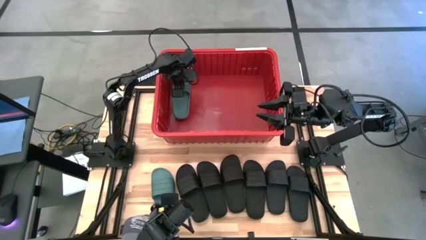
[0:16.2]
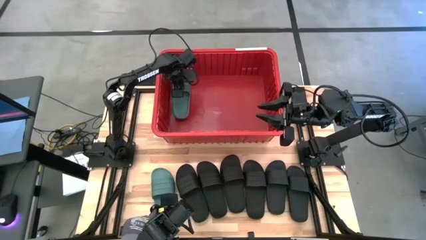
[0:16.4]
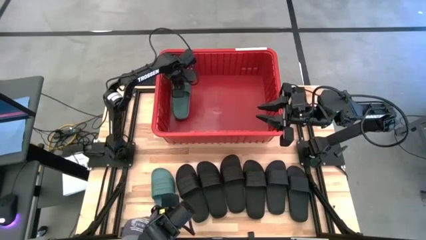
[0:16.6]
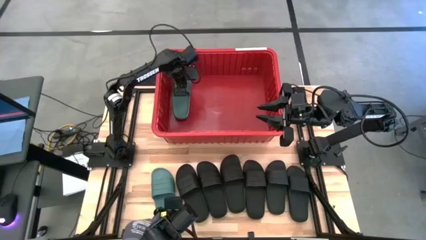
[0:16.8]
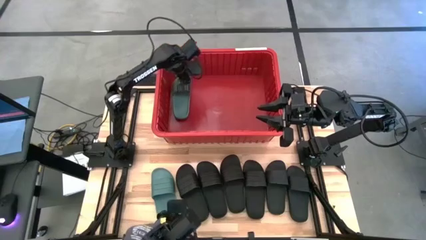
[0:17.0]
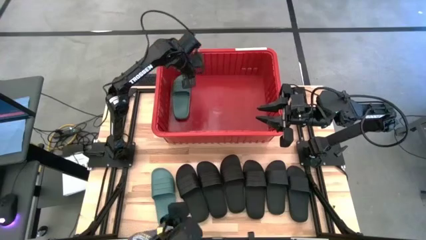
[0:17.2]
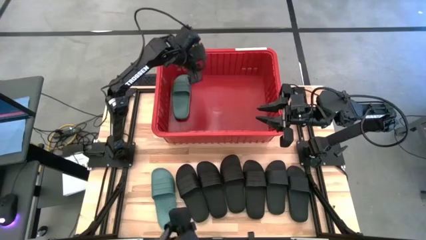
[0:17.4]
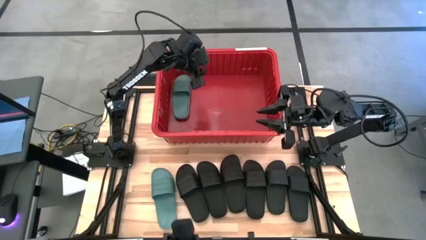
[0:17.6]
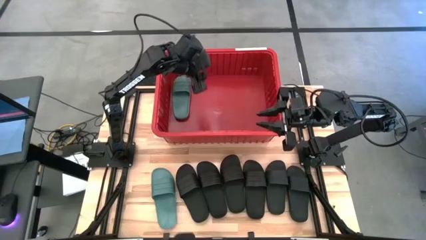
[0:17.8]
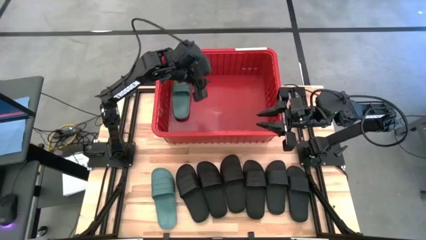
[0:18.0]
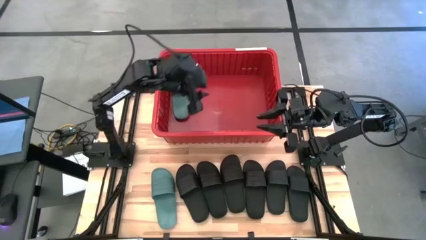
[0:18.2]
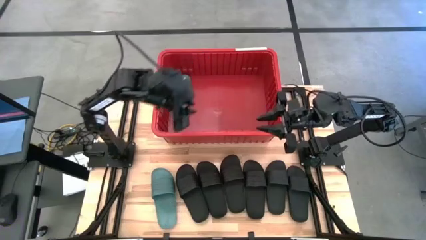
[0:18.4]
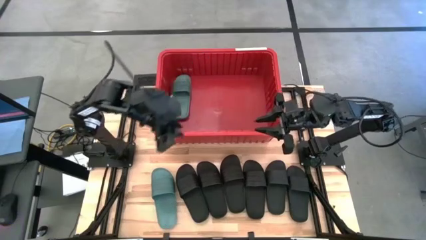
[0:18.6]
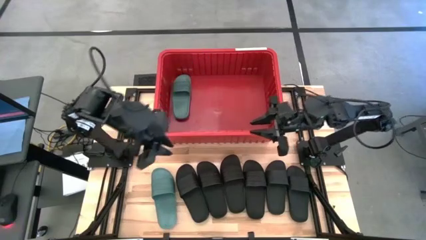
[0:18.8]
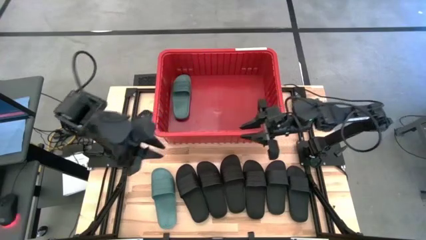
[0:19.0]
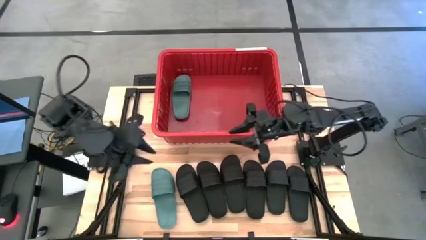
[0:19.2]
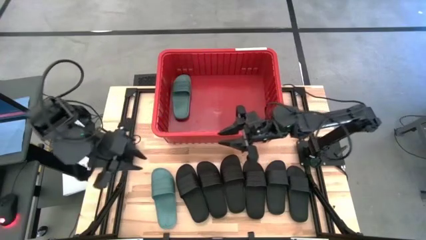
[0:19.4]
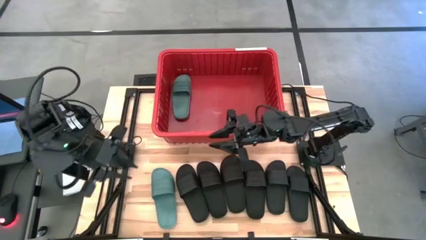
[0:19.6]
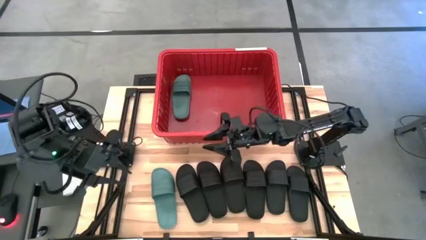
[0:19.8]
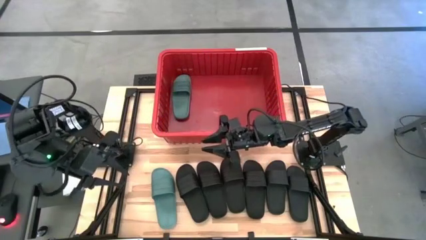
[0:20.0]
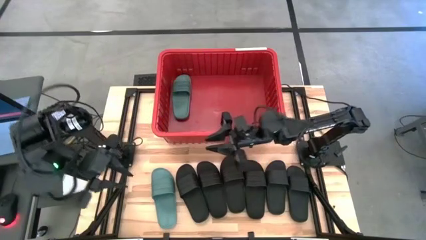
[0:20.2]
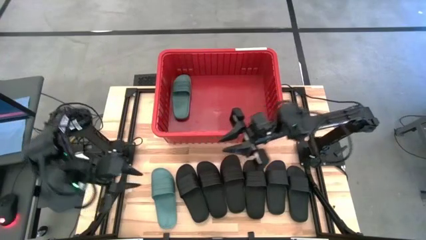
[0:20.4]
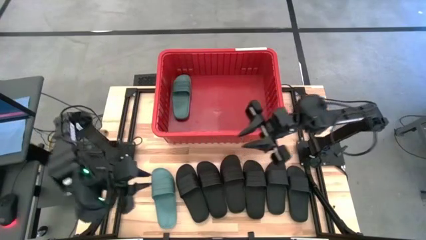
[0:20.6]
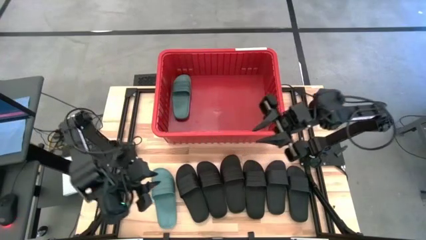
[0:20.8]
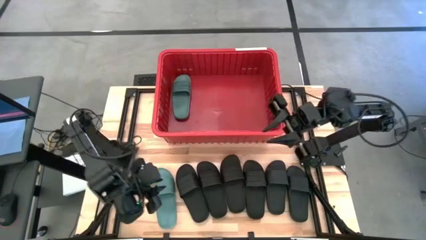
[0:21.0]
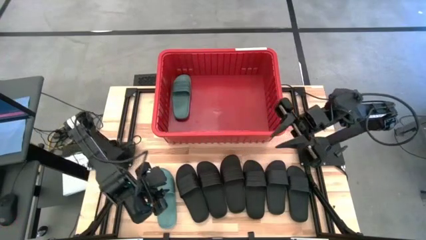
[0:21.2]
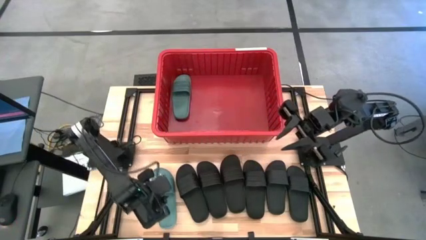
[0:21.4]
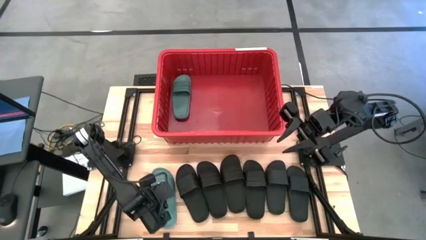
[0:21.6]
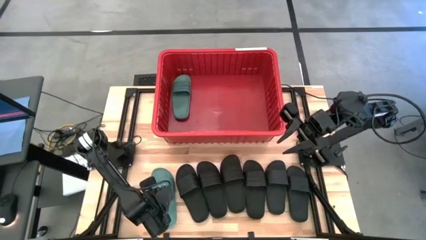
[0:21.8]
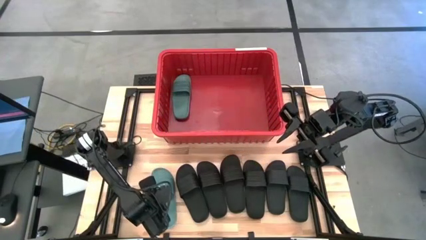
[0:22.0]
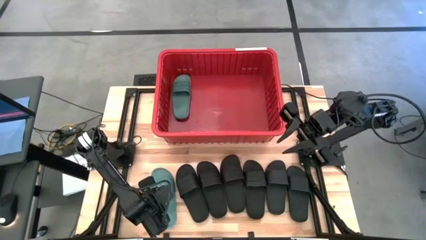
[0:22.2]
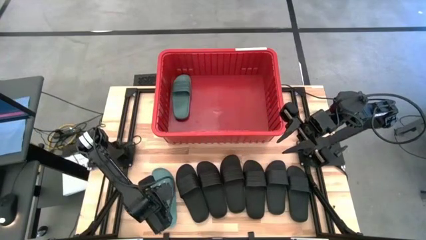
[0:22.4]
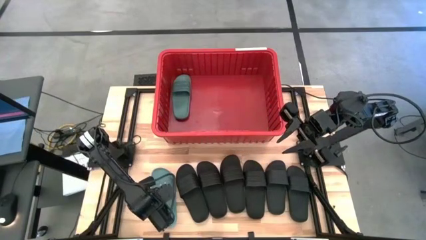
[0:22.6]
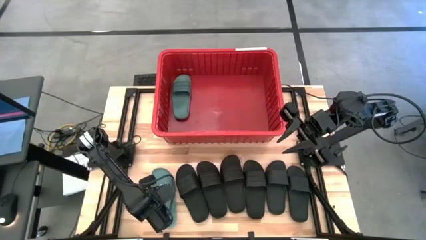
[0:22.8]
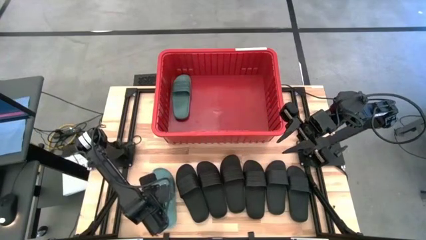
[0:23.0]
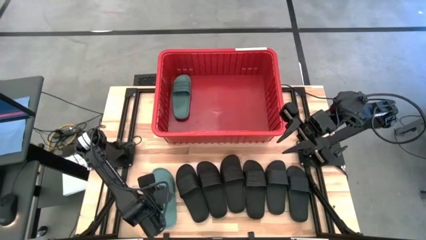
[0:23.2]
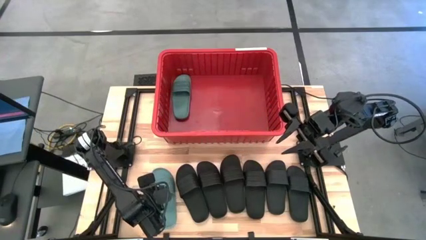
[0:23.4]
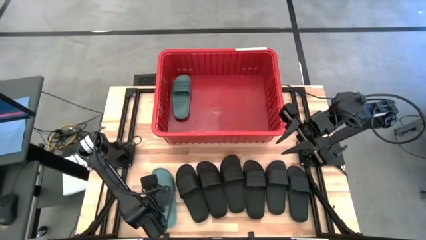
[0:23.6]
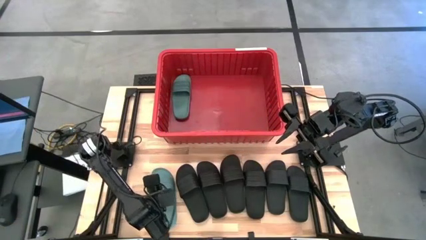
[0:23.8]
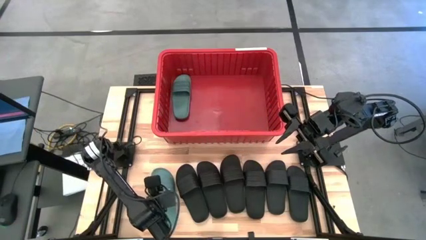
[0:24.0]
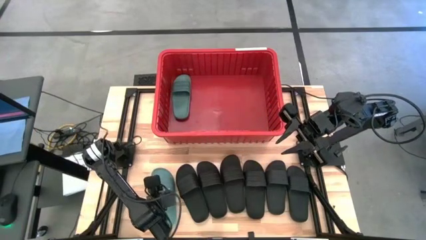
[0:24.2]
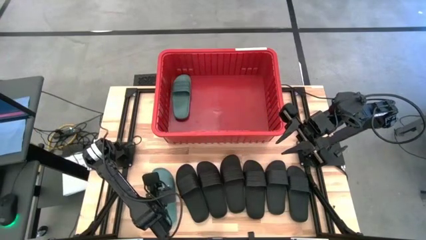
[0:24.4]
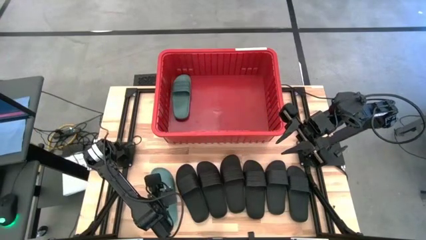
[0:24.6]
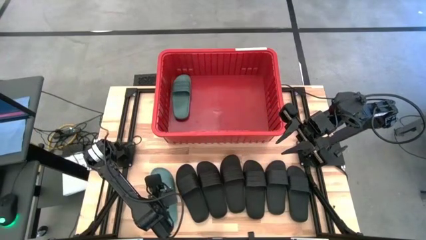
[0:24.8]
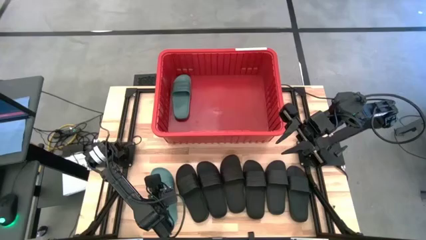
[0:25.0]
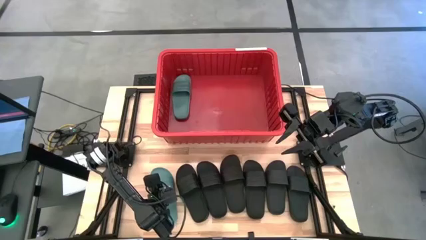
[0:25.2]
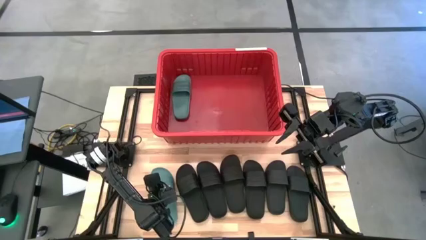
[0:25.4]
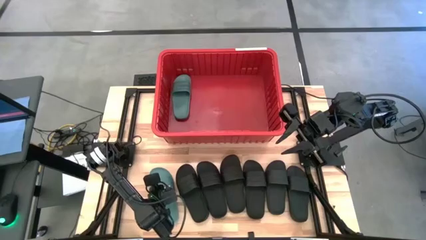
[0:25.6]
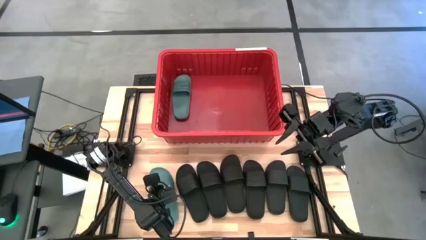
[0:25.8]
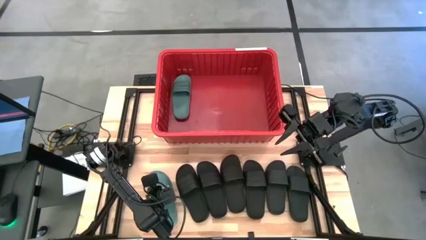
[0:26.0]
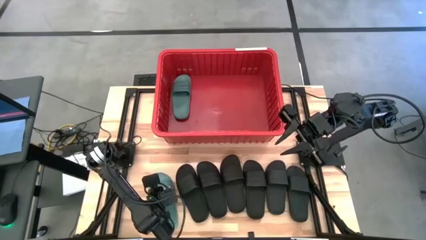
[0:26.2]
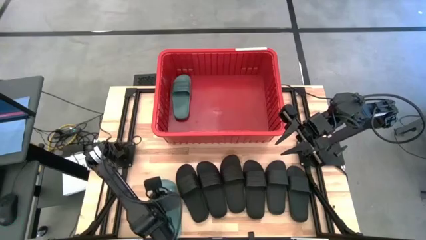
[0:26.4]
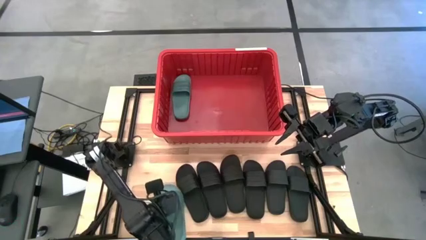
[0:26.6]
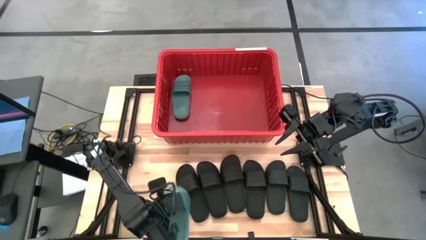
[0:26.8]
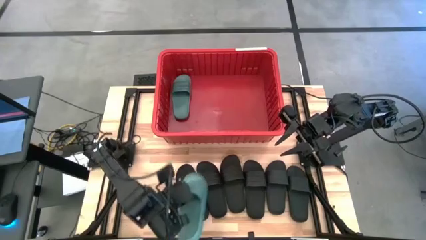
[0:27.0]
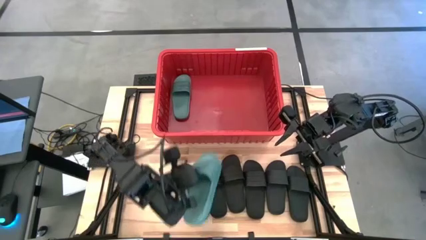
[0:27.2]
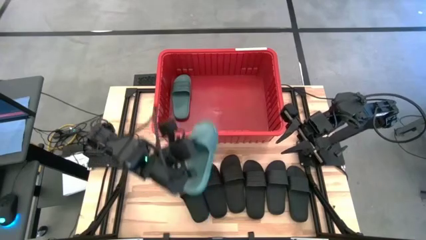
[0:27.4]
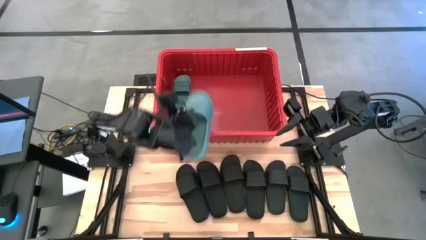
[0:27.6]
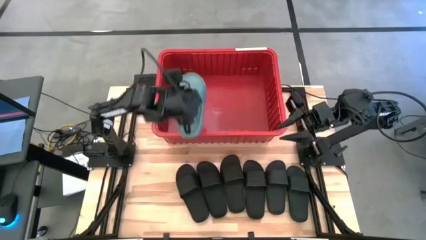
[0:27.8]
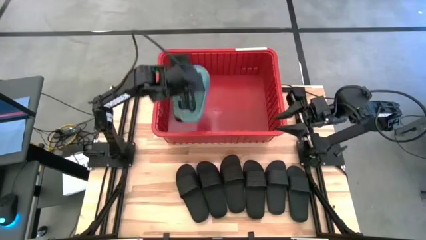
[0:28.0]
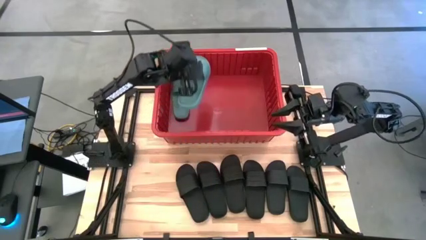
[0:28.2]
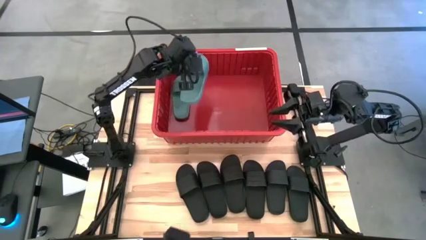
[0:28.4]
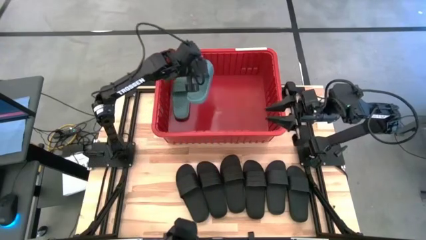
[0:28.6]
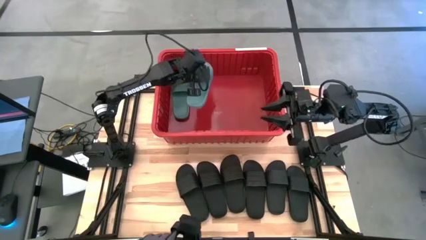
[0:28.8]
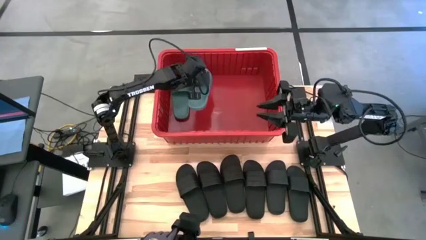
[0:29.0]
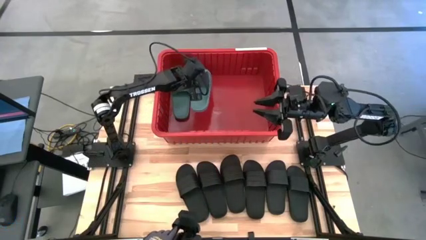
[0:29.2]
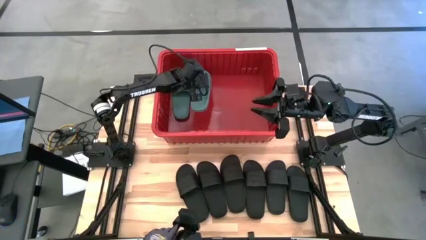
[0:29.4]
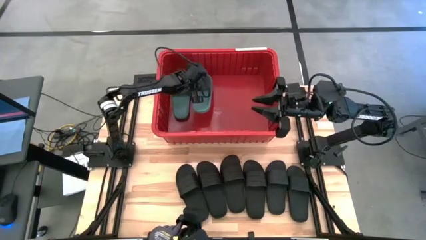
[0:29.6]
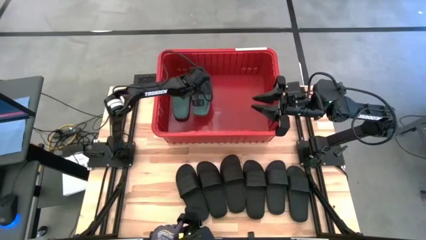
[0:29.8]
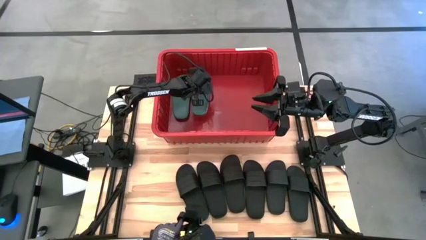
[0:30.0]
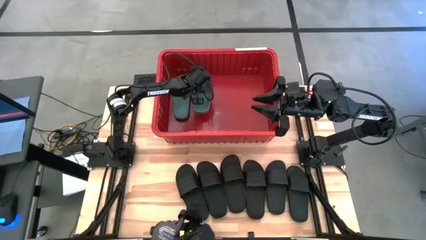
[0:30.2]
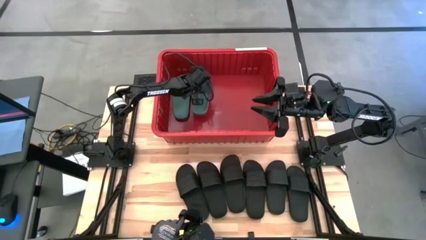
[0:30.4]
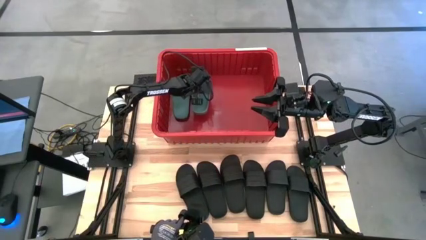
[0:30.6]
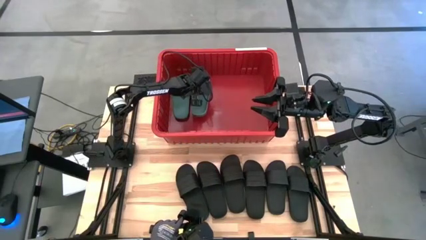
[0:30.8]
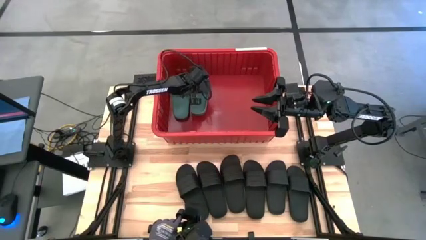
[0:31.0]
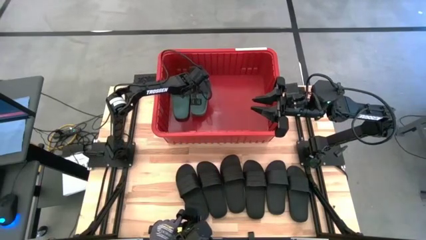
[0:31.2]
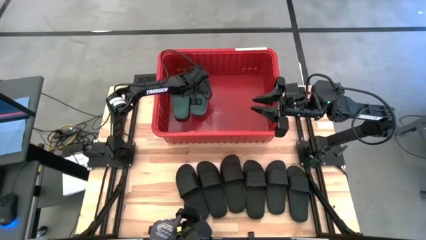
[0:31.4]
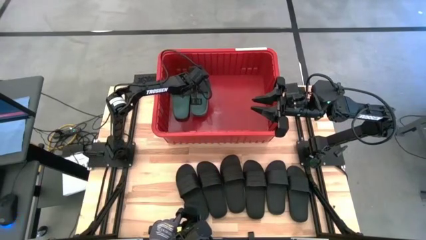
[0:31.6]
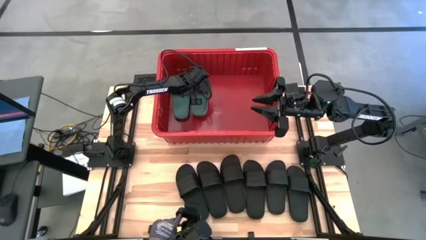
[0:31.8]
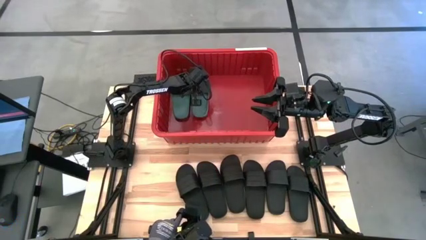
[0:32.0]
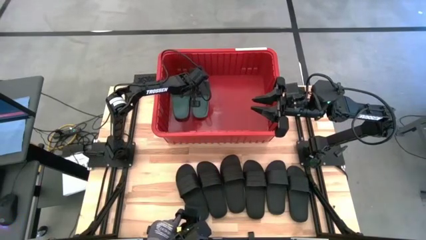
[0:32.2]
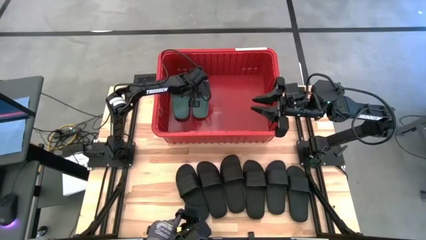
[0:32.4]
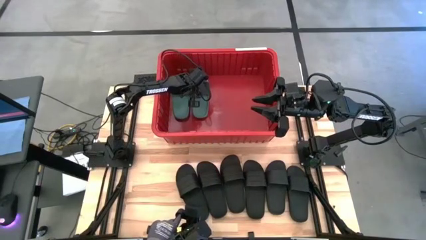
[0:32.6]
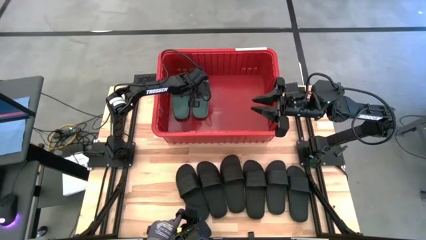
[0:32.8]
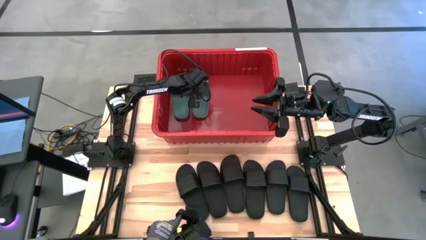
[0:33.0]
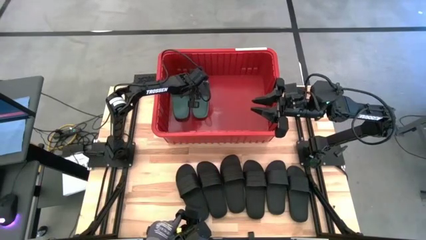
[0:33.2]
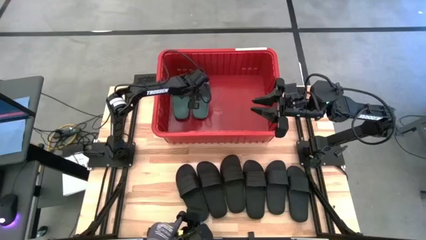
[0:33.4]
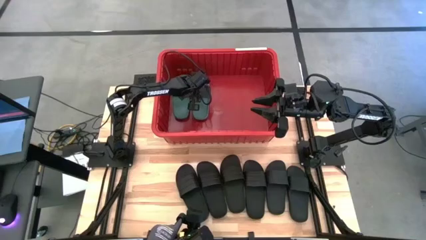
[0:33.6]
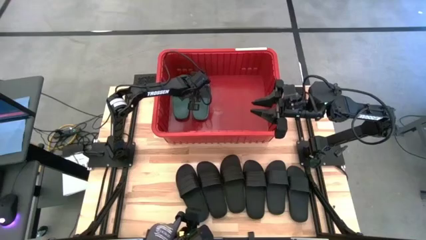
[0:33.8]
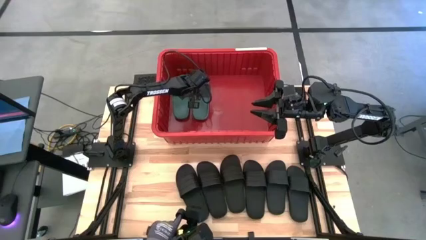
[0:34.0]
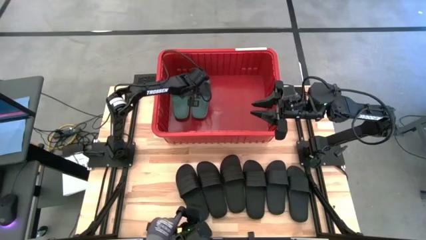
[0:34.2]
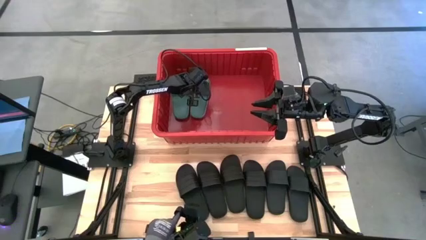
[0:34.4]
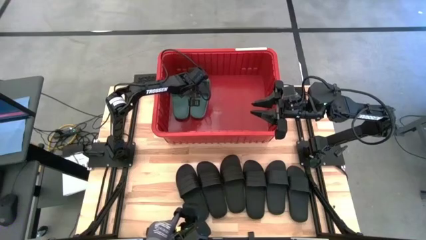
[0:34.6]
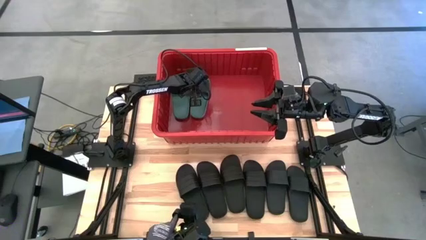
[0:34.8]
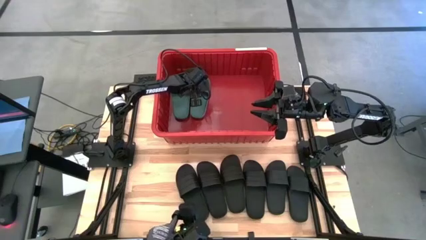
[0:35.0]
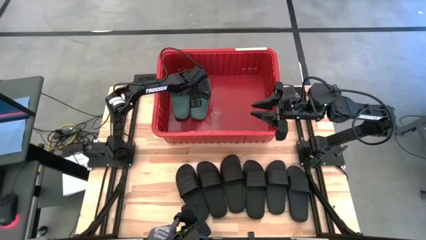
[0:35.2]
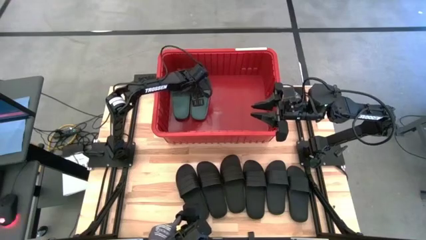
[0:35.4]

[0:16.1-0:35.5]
Task: Pick and place slides into bin
Put the green slide into the red bin
